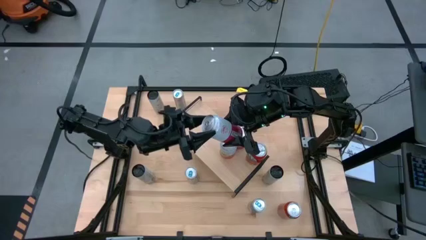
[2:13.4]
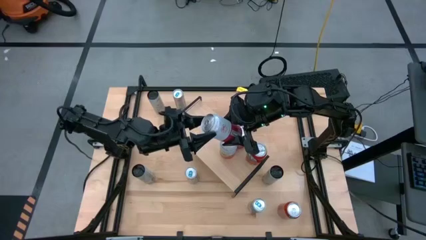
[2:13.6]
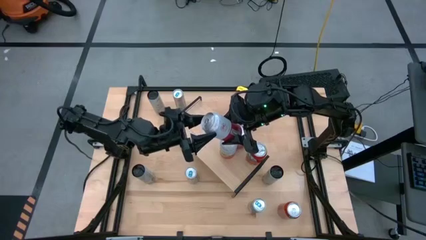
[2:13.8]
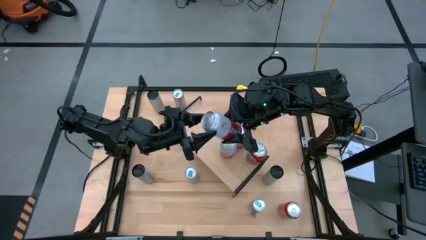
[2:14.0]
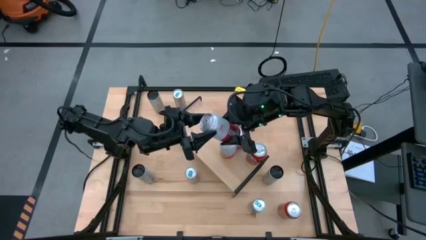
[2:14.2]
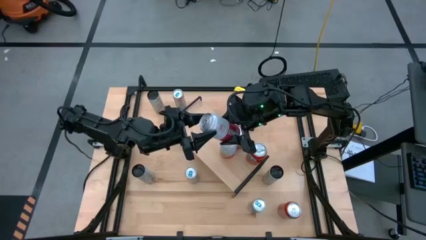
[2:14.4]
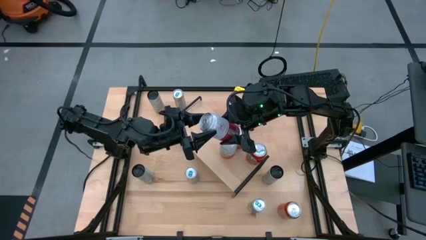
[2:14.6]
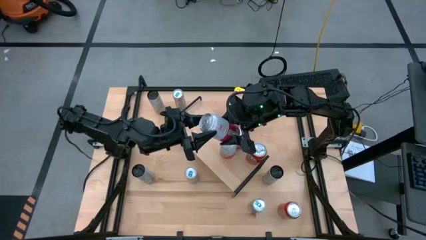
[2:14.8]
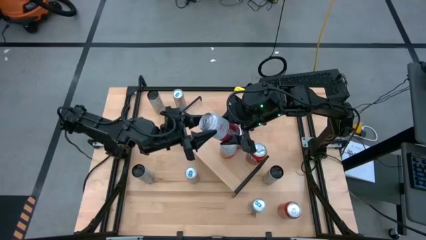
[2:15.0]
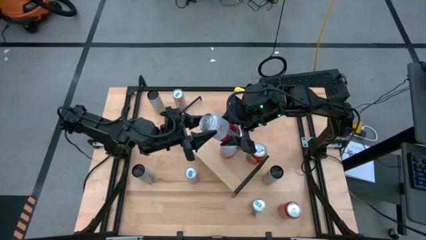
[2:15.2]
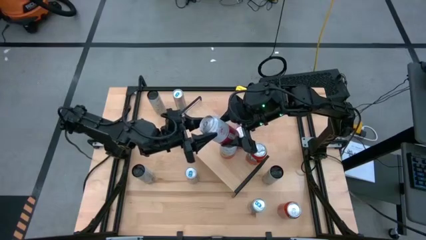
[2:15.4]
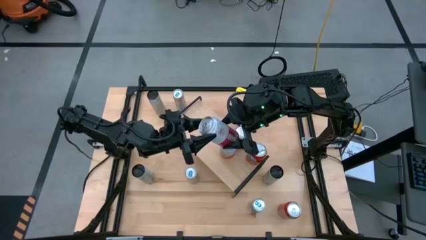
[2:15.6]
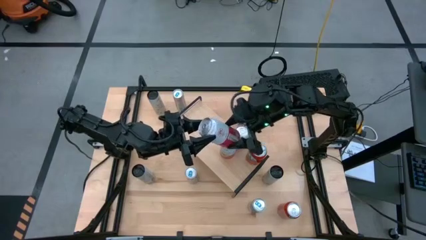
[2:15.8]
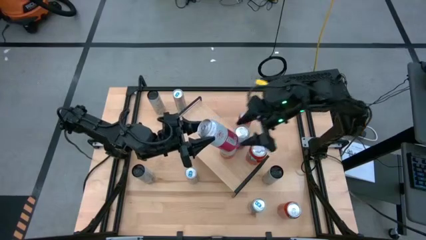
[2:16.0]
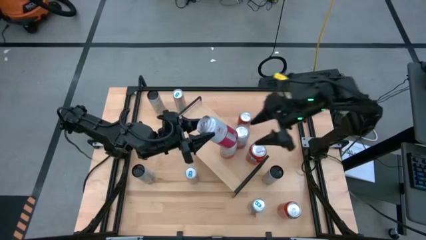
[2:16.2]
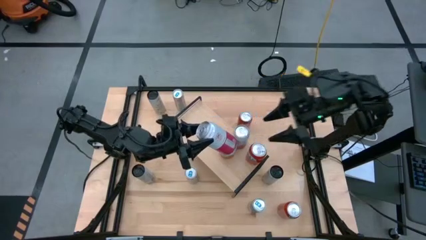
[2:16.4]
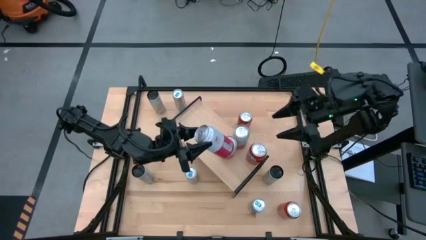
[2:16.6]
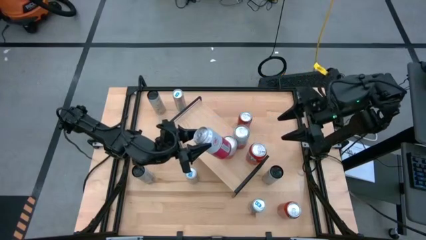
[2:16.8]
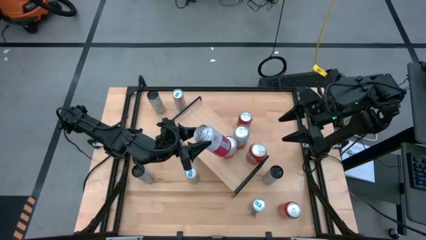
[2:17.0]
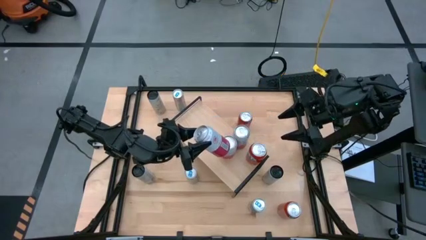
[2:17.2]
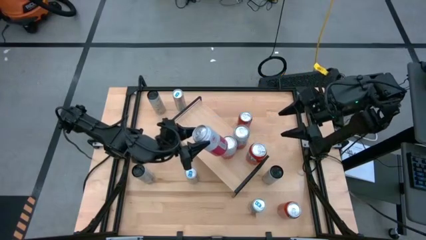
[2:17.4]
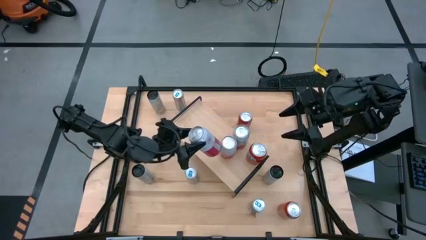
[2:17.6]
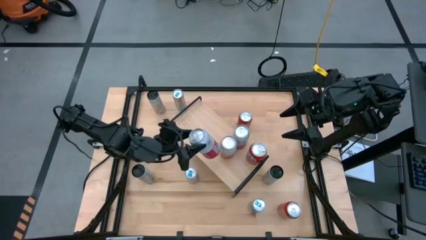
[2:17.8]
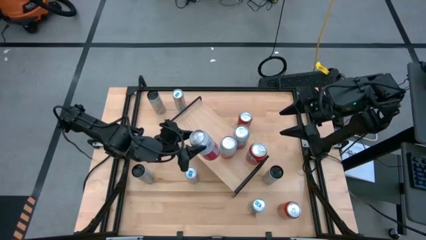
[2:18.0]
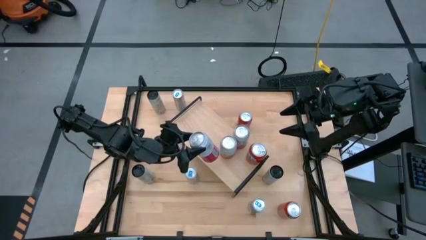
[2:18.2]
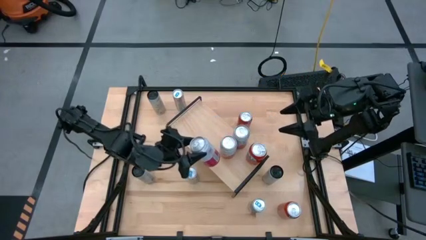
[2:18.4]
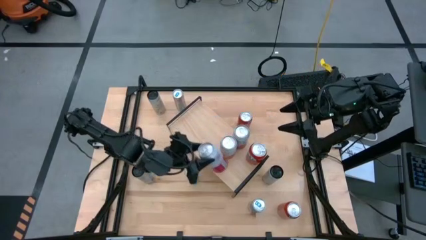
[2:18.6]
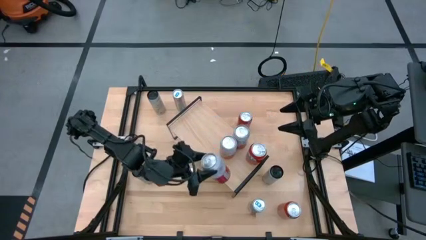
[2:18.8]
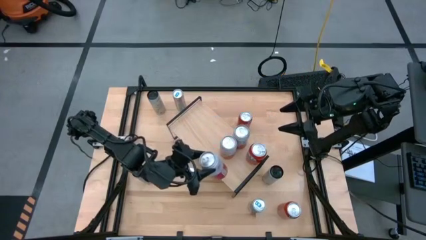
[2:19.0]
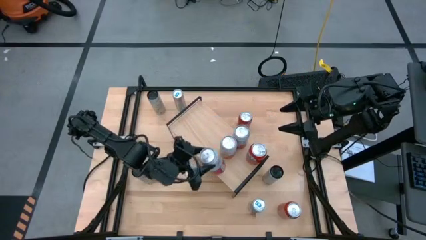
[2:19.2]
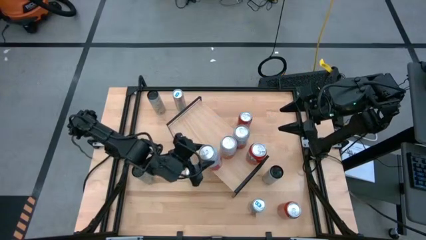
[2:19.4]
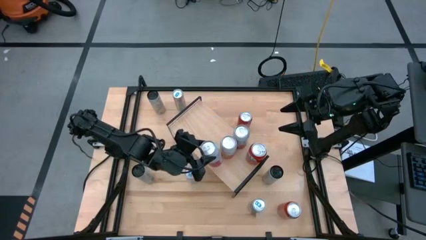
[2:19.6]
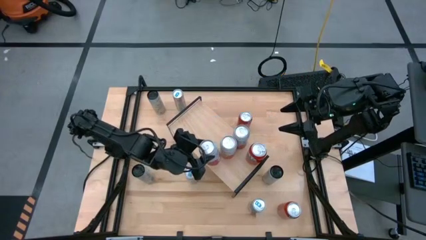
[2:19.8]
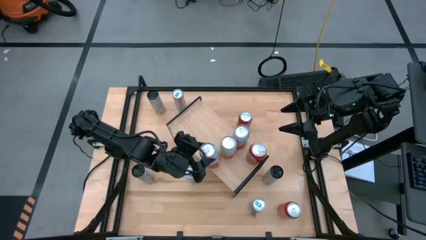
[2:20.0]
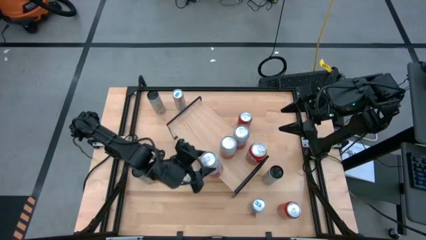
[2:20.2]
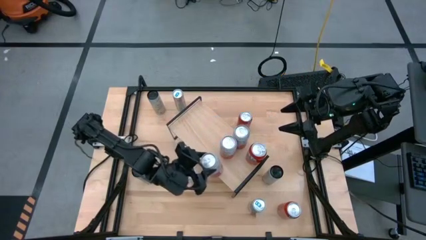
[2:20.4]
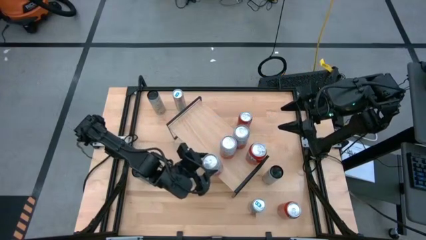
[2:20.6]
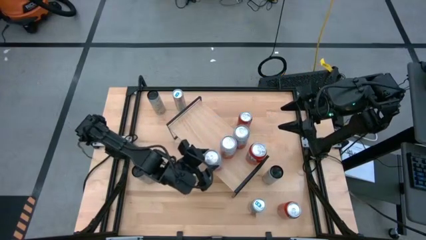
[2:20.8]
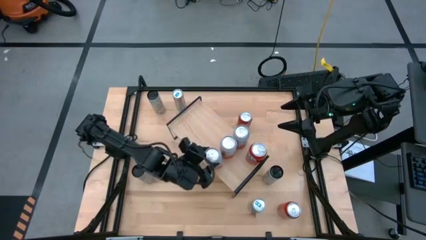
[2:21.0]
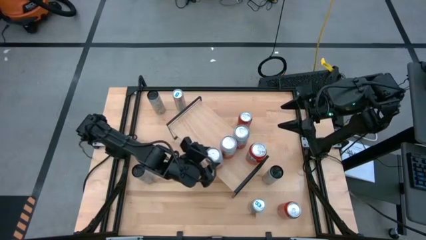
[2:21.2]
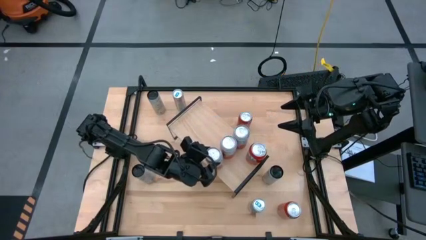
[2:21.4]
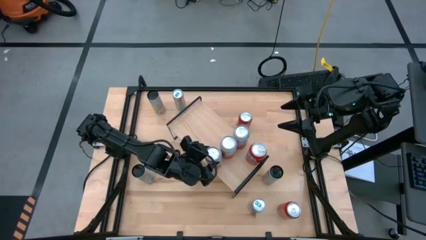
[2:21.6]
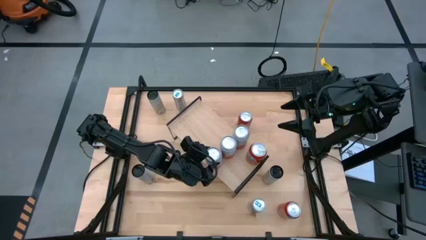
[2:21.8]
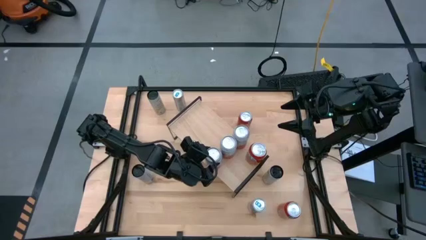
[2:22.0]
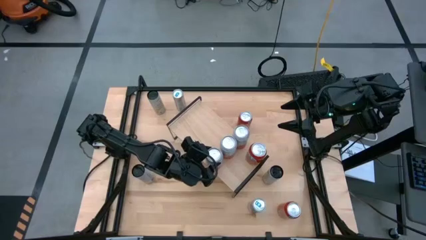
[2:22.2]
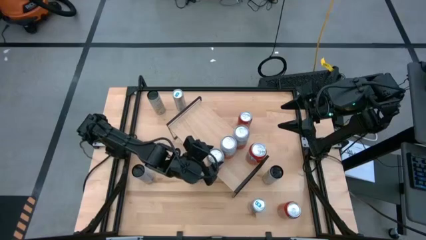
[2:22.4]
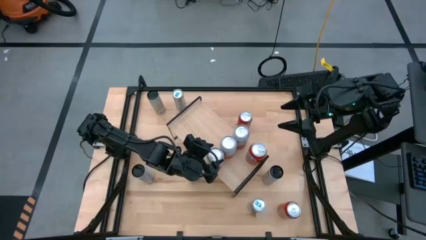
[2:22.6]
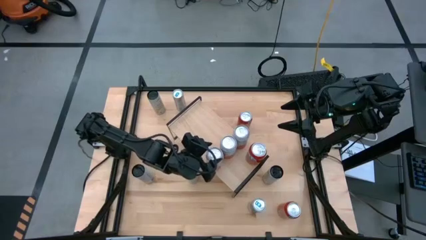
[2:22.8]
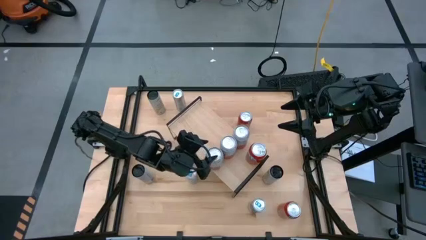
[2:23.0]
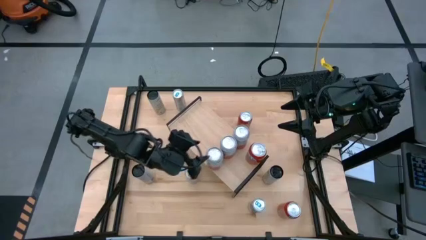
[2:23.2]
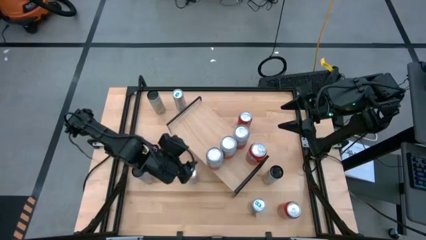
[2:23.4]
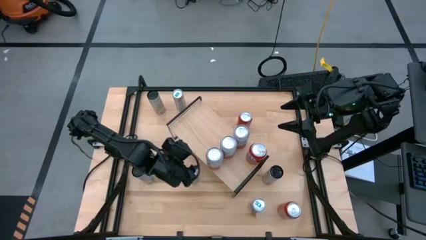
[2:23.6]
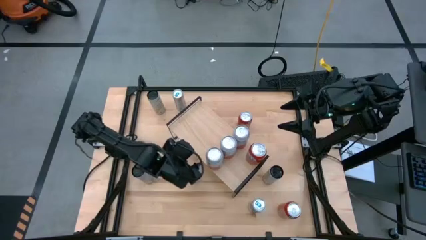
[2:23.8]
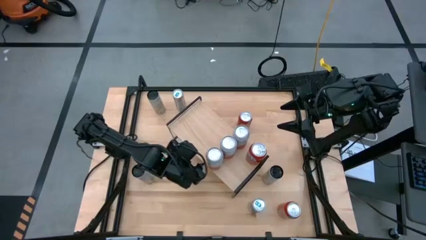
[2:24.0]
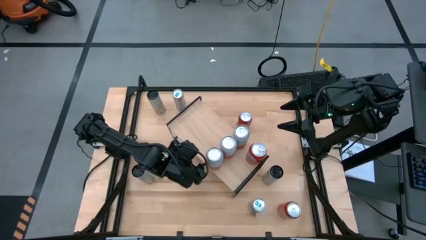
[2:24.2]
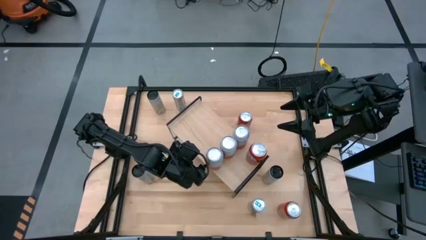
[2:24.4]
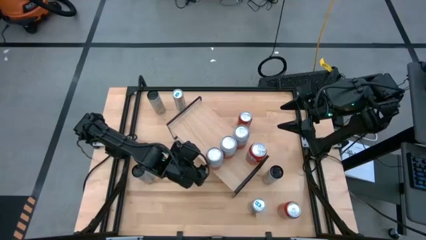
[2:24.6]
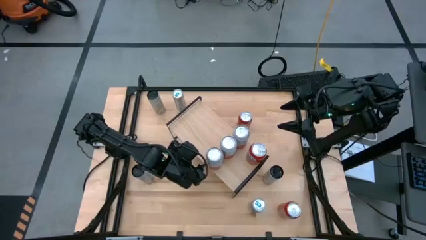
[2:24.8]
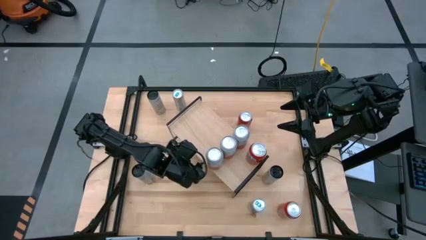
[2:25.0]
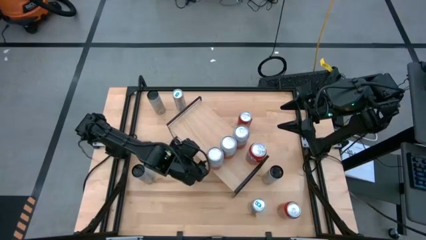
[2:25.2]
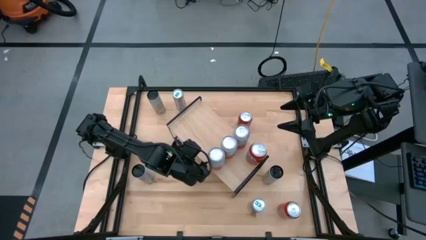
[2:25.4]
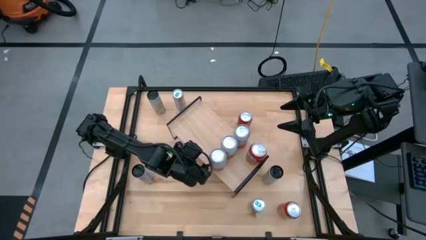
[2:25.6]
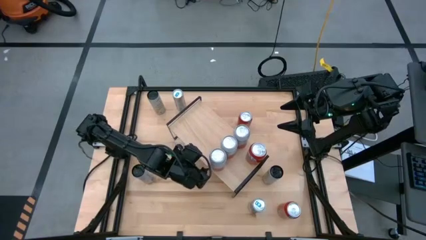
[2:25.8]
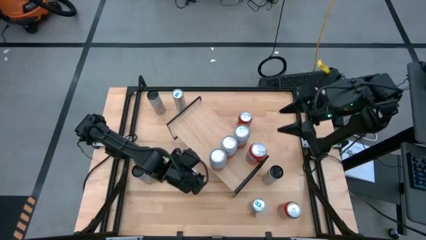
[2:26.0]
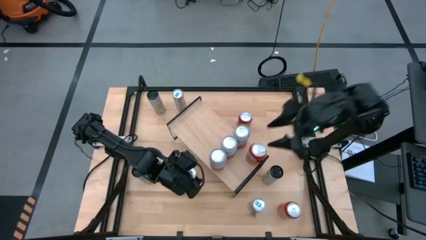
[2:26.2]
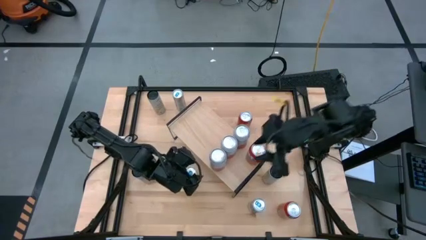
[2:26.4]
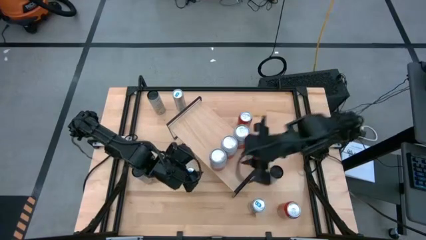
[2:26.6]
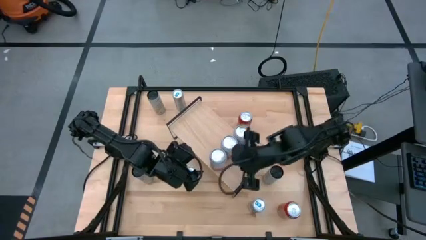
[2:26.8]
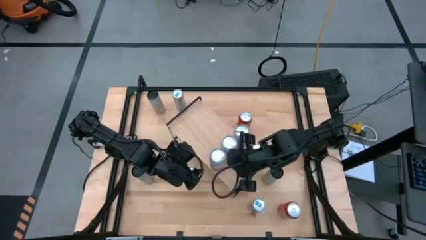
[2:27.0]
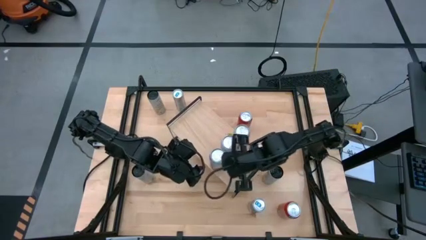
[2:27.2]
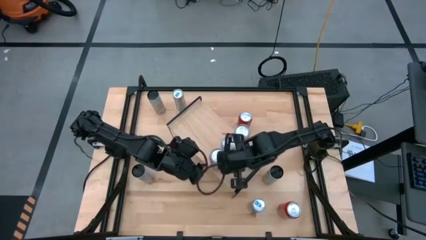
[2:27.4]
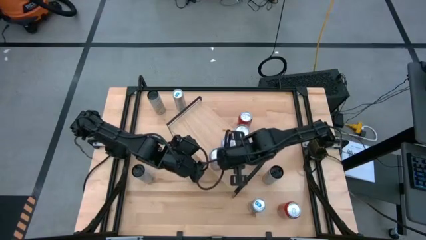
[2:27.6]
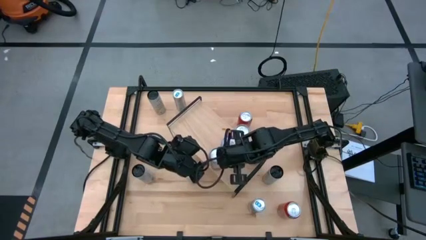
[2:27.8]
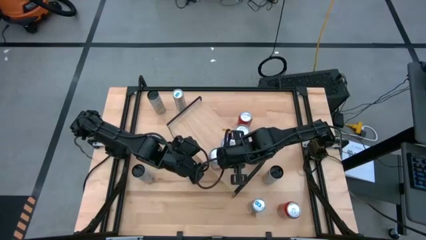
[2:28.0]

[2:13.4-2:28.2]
Task: Place canned beverage on shelf
Put the pink white soda can on the shelf aligned with the other pink white soda can

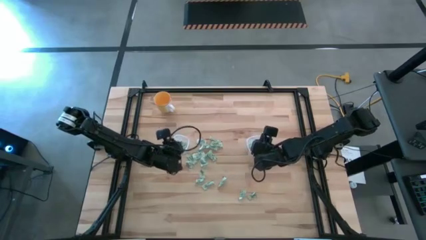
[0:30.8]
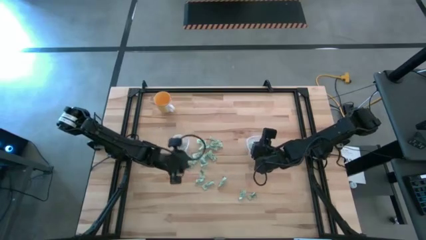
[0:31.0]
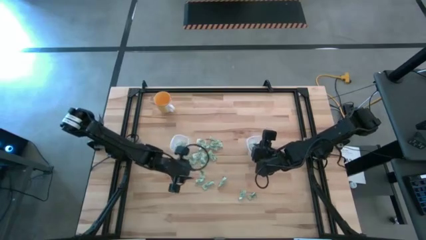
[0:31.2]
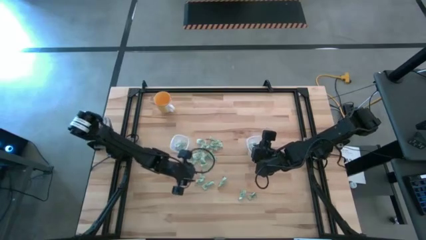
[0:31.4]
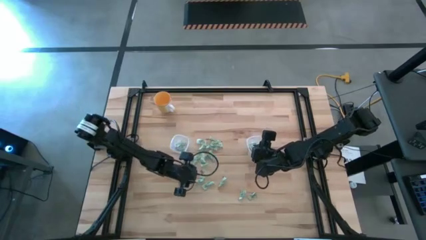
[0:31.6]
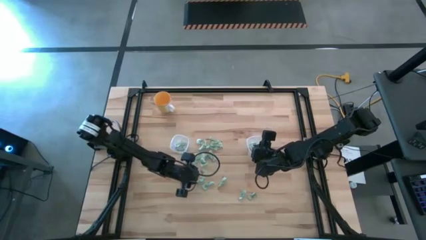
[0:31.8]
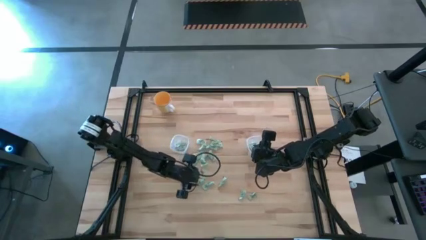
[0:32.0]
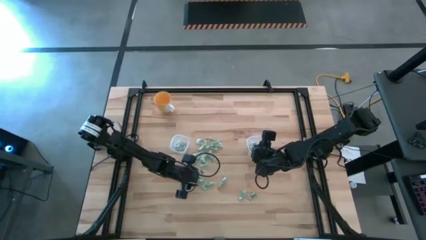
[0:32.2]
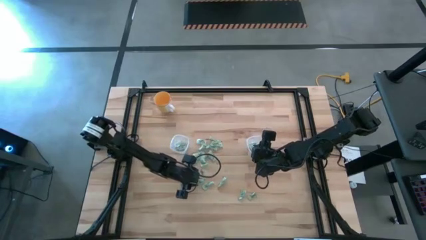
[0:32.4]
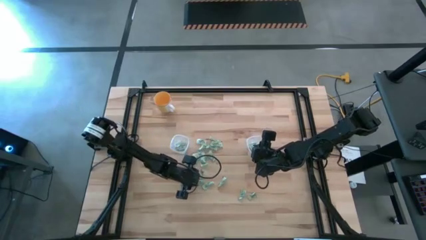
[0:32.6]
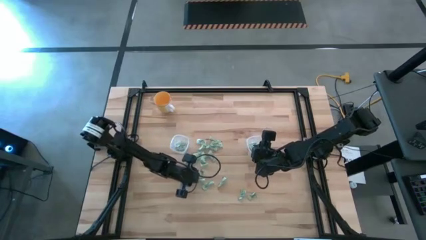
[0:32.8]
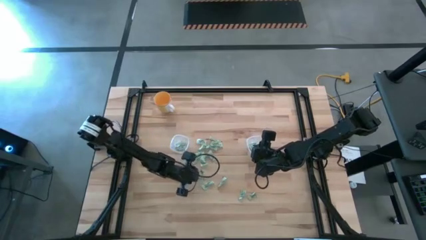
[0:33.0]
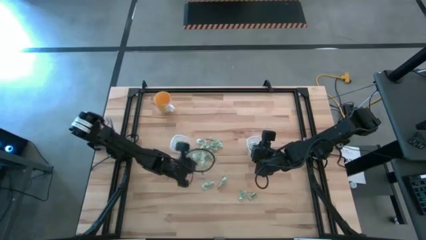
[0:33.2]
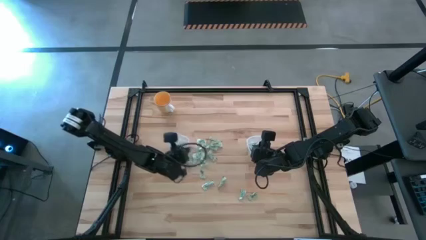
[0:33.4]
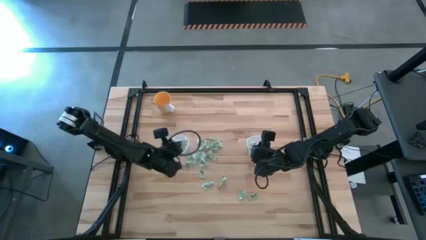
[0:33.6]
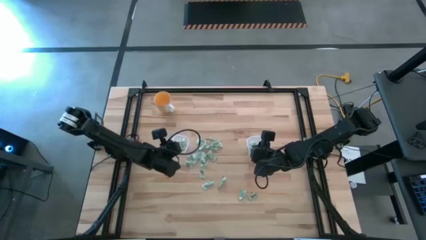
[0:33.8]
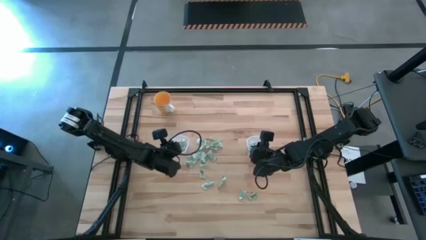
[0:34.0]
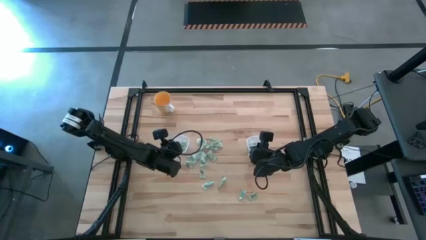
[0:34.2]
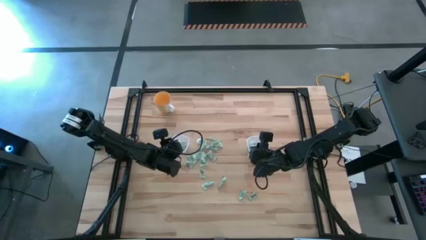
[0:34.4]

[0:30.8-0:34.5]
Task: Pick and place Stevia / Truvia into bins
Put the stevia packet into the left transparent container
